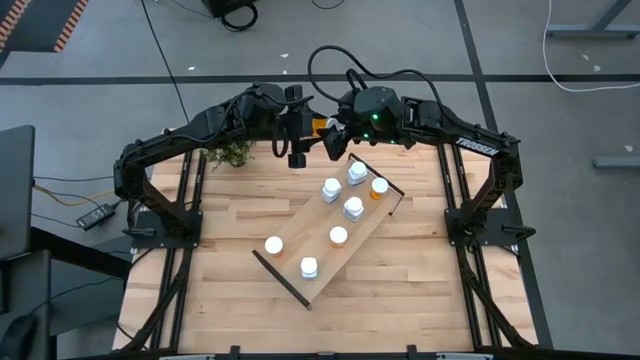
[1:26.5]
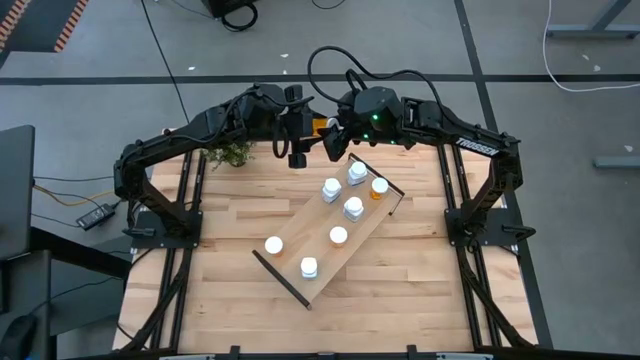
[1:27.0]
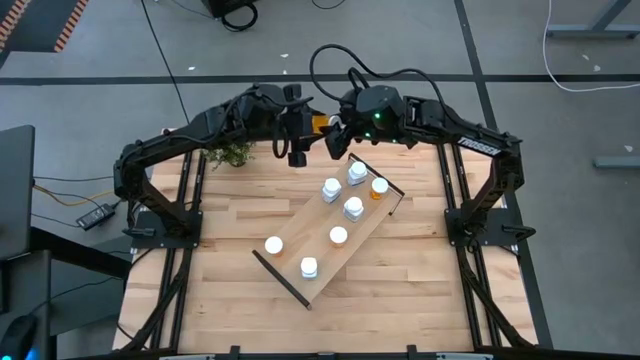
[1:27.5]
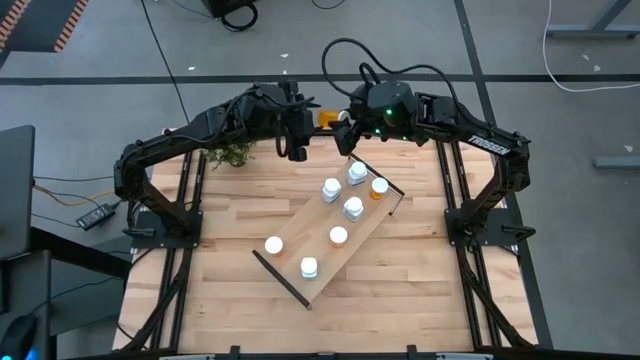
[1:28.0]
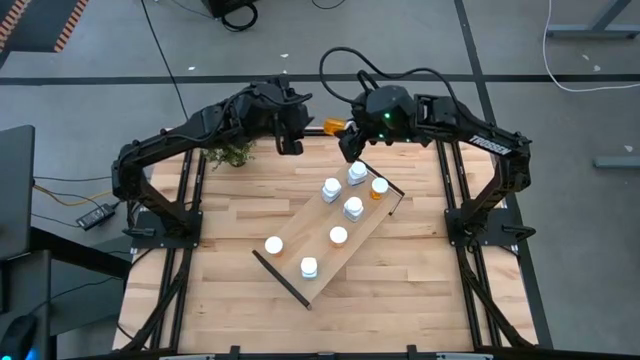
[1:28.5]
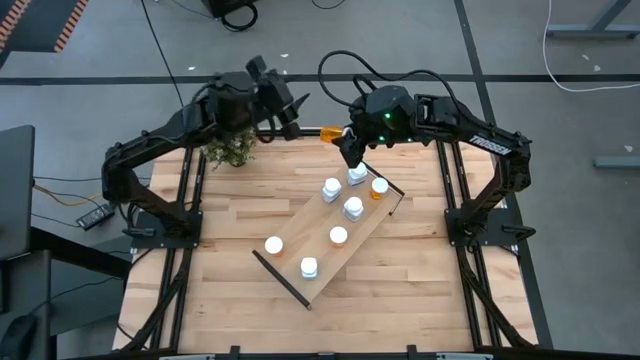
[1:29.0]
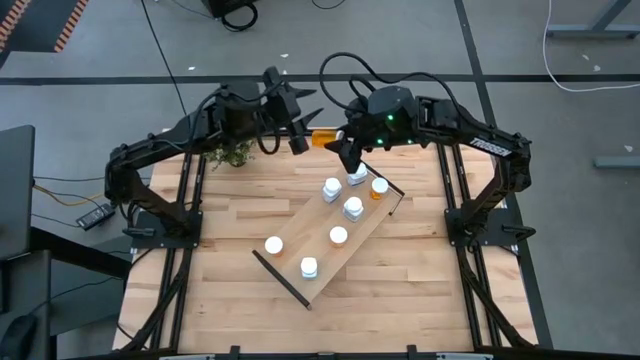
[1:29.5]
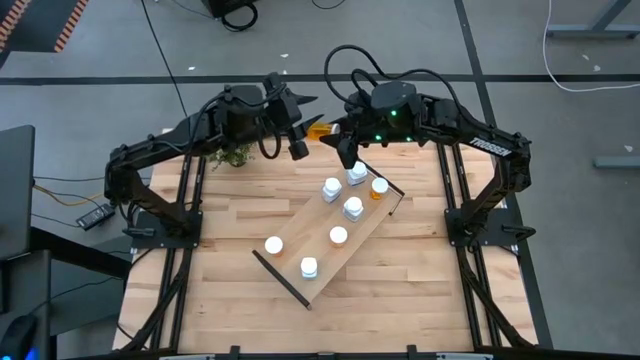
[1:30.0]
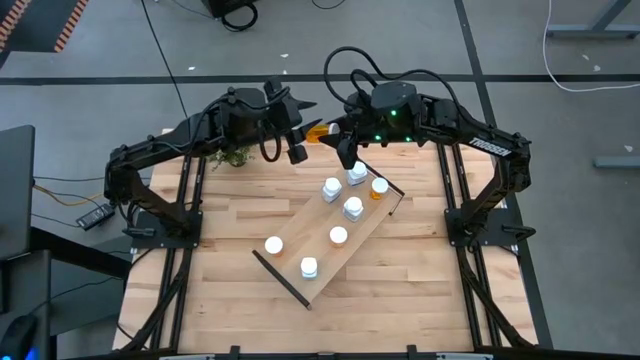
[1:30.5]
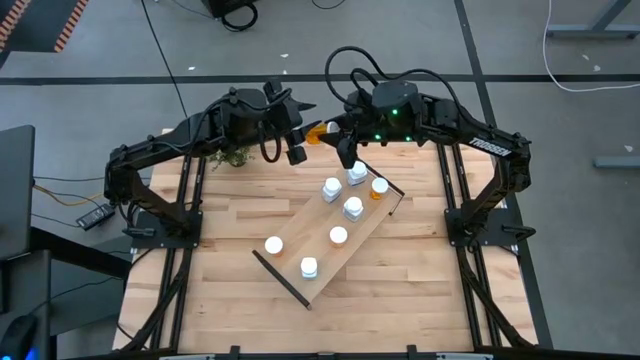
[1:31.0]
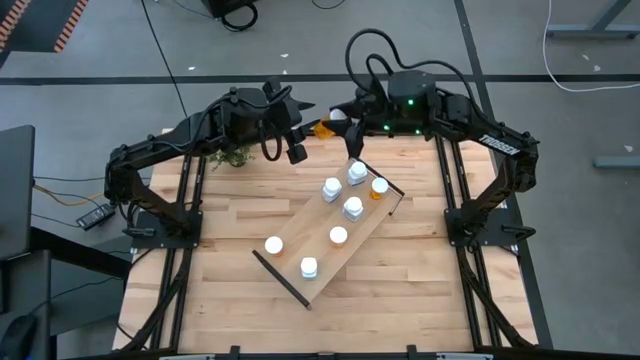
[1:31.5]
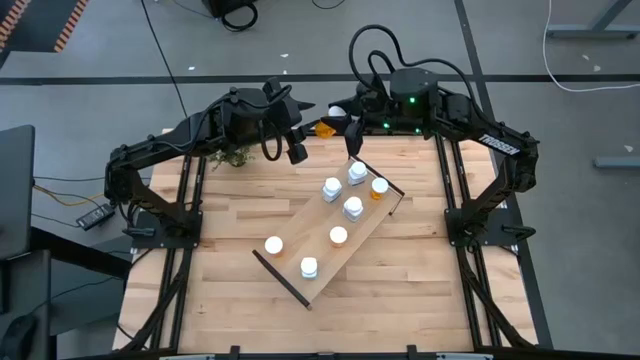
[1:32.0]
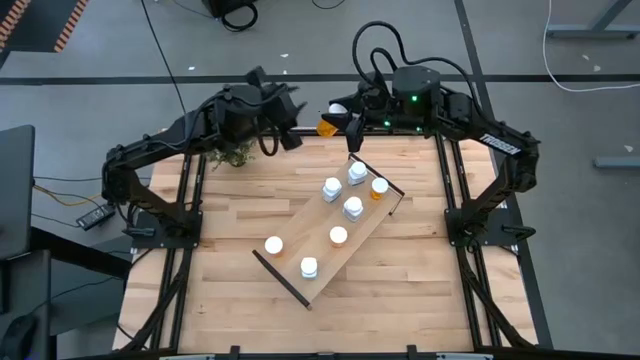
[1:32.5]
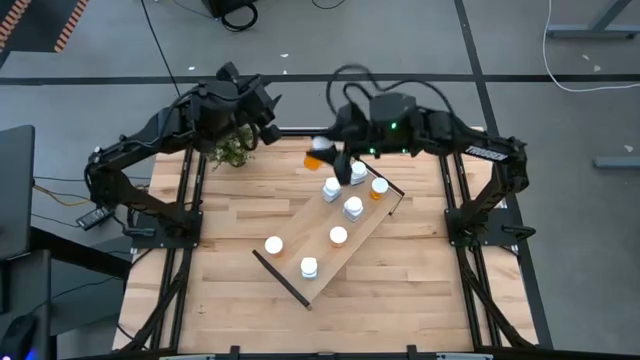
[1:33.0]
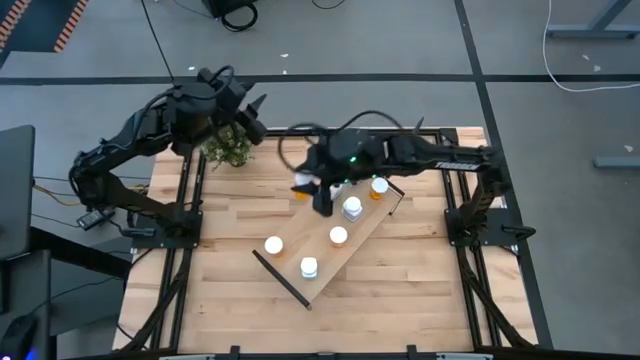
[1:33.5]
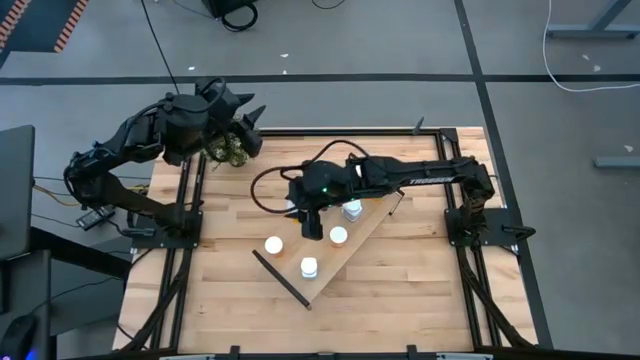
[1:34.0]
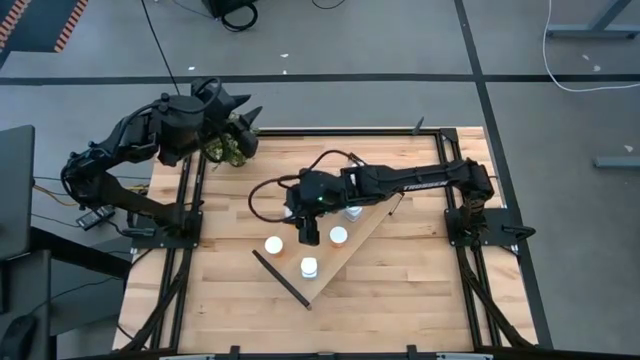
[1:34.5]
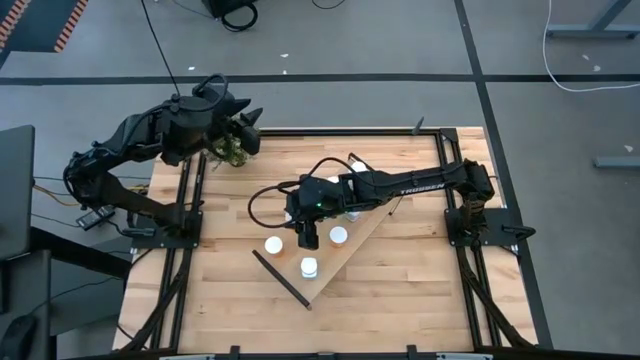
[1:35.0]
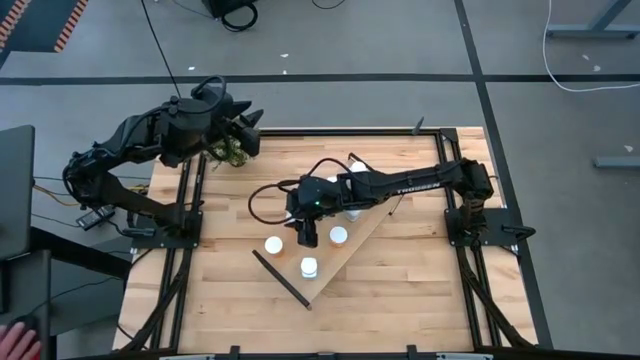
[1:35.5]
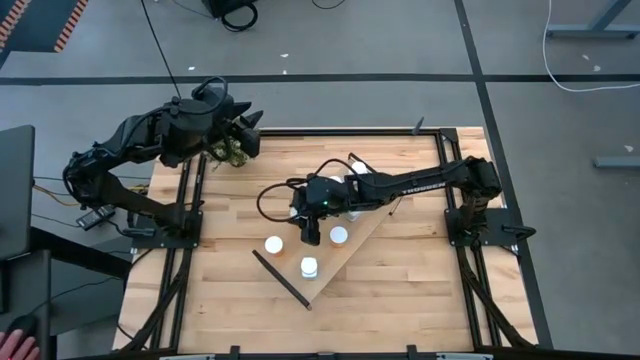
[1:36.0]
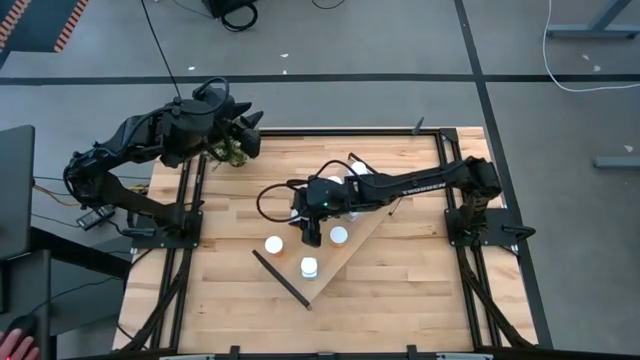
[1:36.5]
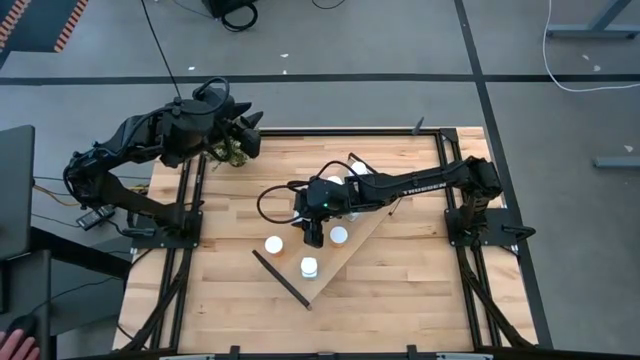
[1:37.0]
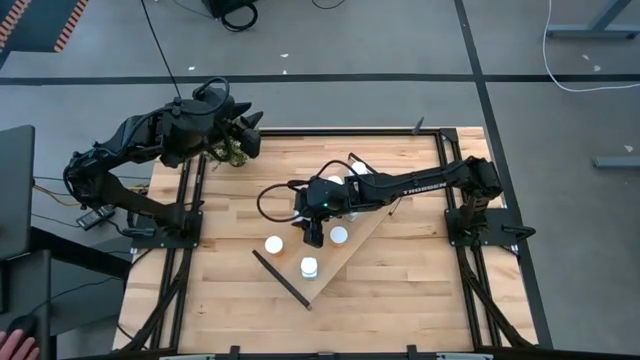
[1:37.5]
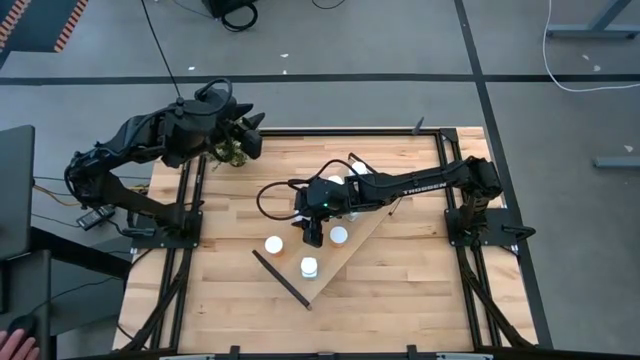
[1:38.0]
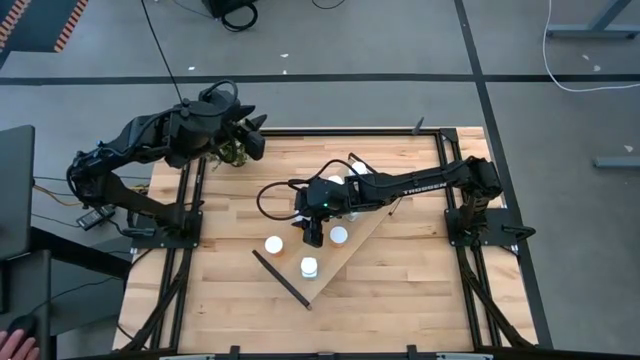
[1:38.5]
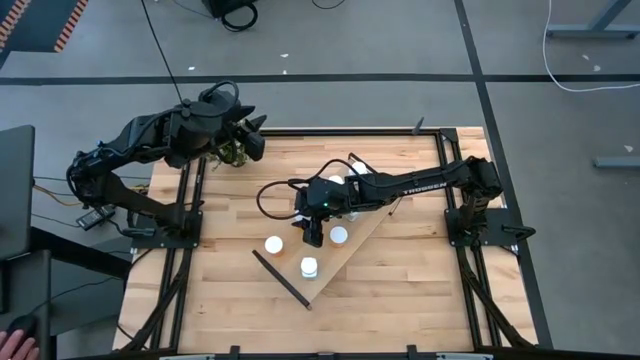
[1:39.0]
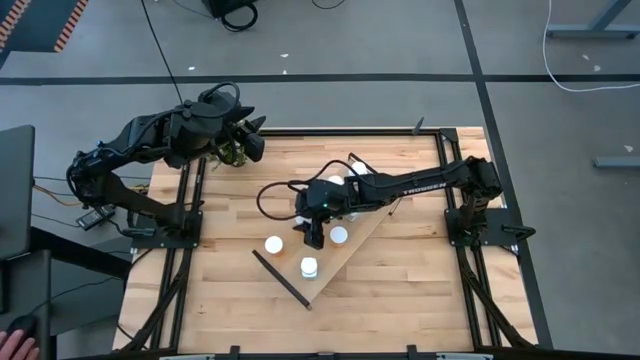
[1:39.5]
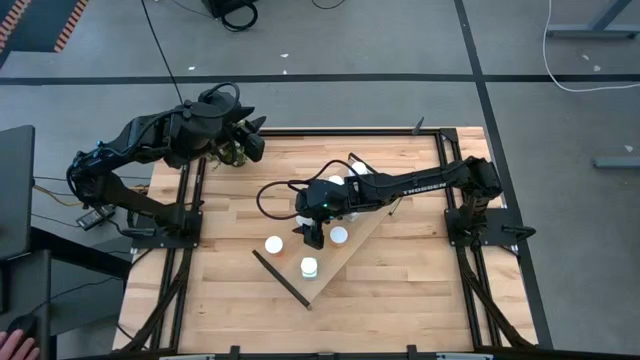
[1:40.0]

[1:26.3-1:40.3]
Task: Pick and place medicine bottles onto shelf by color
Put the orange pill bottle on the shelf

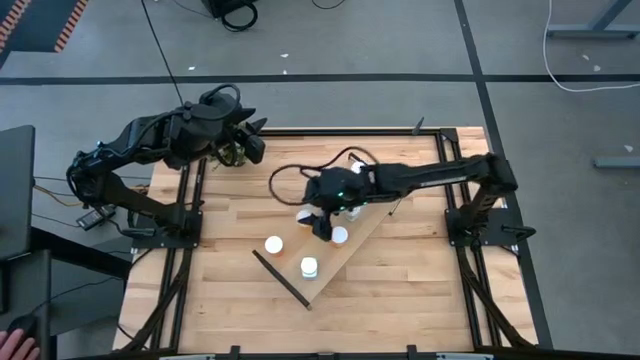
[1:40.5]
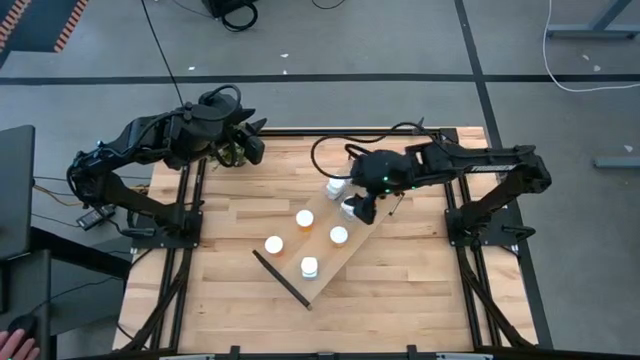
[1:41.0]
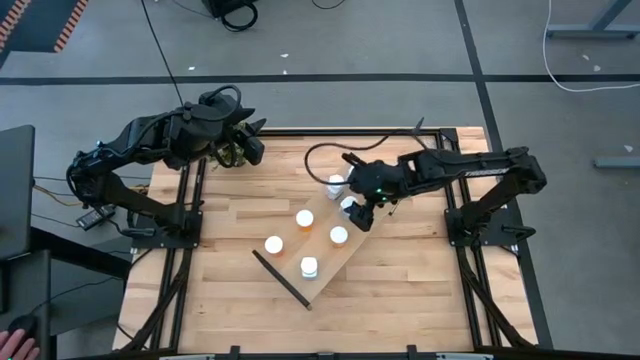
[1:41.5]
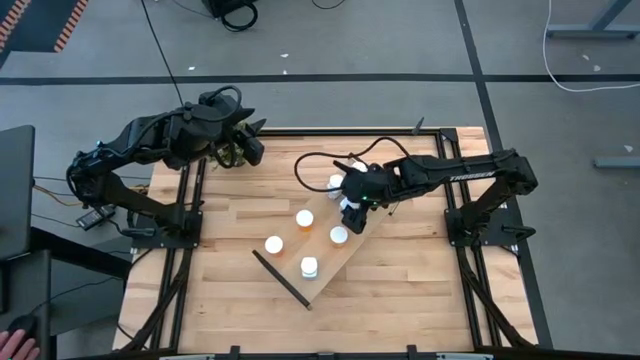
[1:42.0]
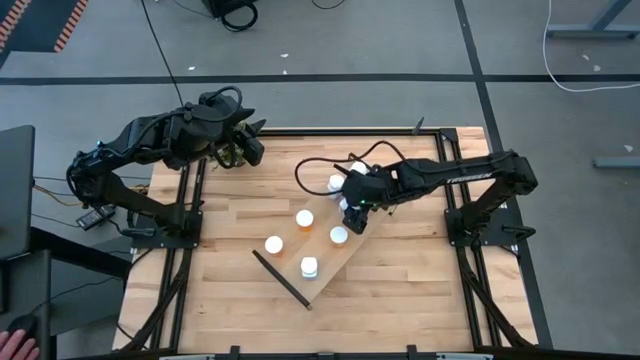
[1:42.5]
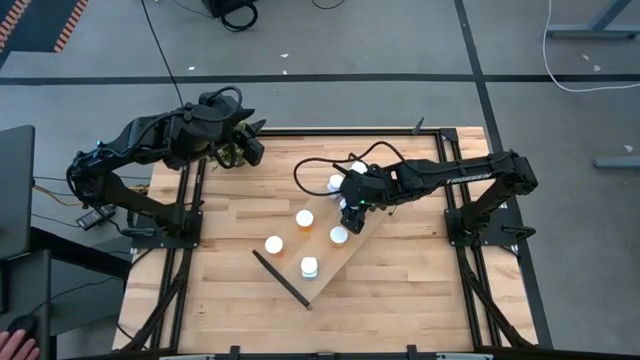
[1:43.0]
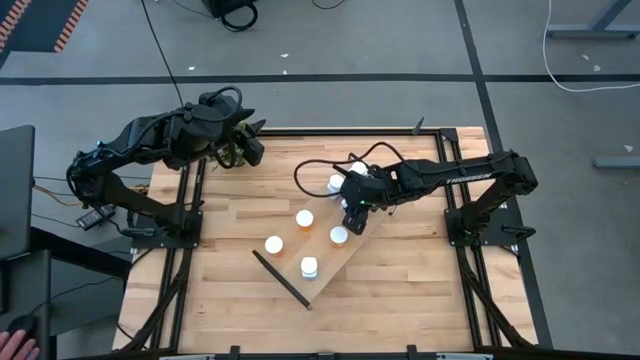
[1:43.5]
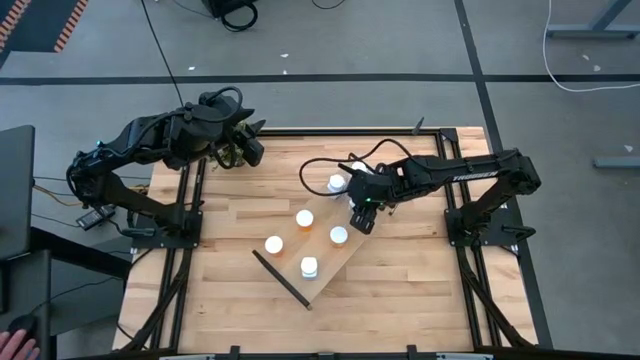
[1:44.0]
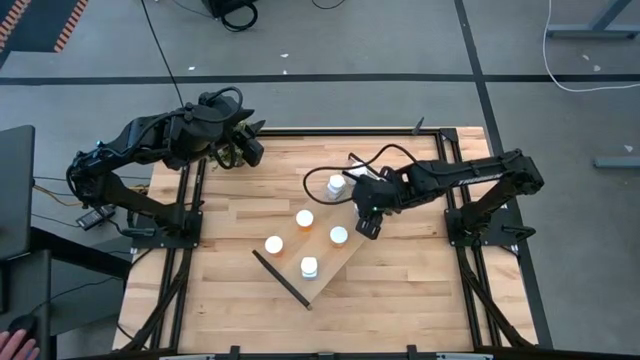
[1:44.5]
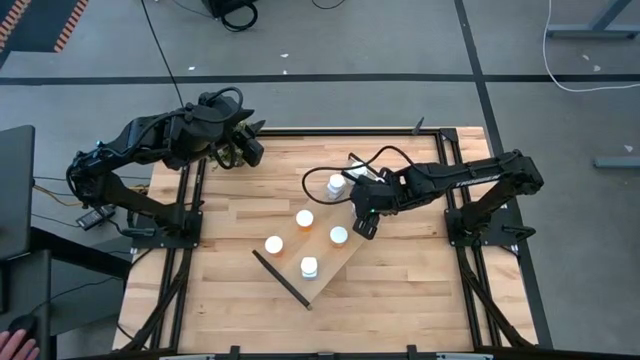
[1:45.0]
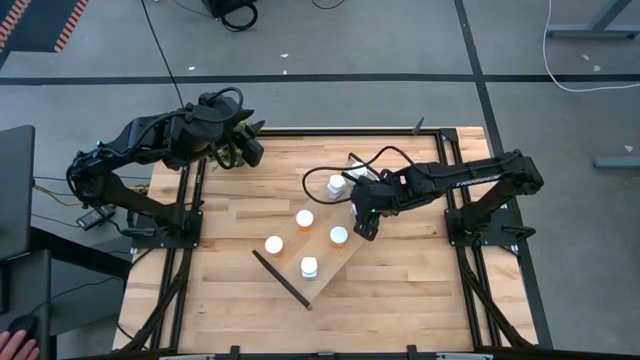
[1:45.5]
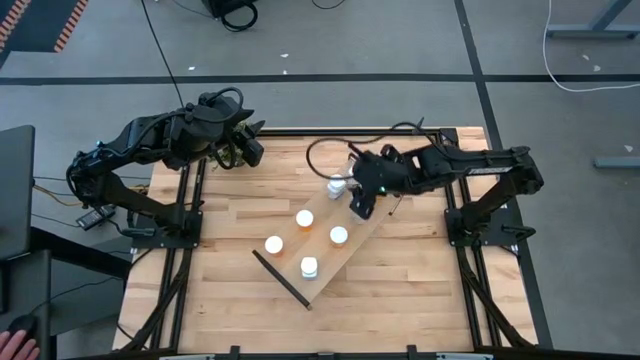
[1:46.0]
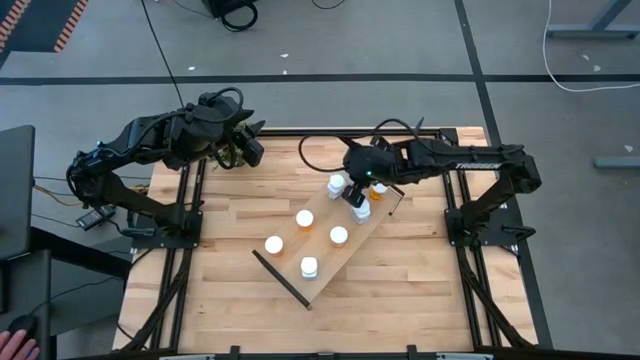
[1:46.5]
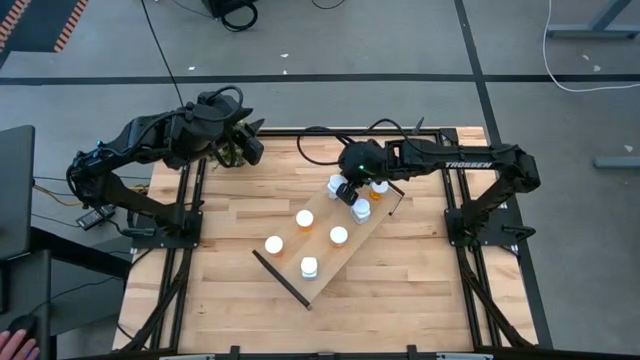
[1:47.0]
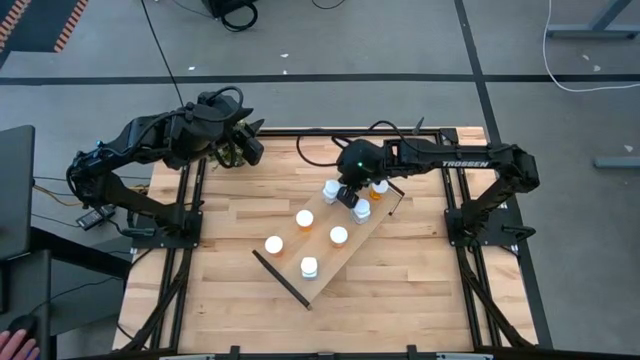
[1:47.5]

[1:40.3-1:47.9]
Adjust the white pill bottles on the shelf

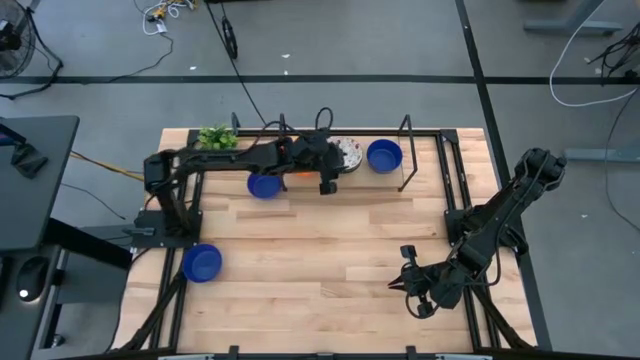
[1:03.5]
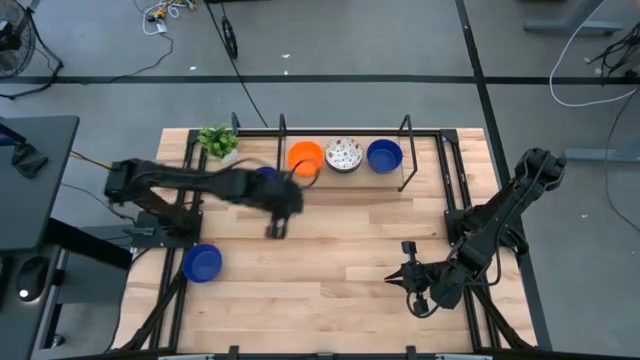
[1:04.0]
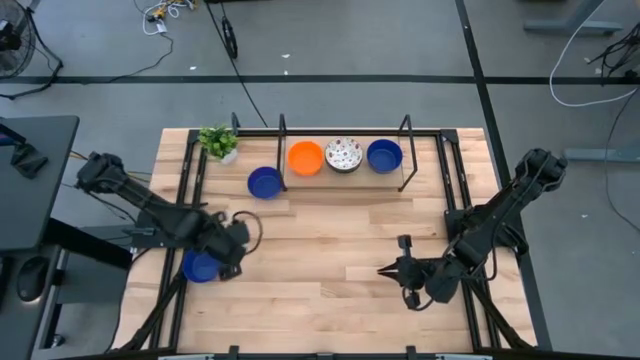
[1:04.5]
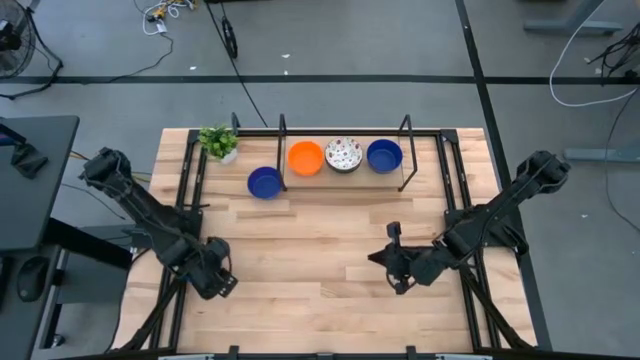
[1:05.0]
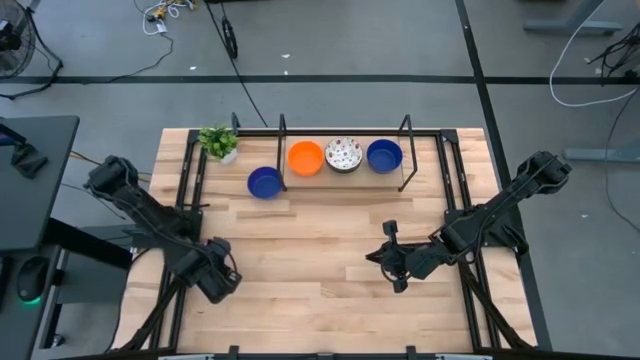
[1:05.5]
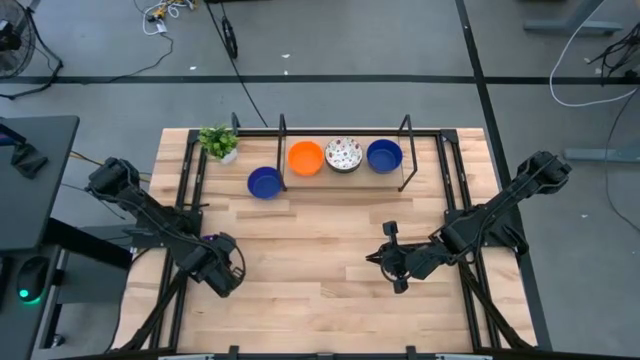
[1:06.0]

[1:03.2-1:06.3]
Task: Pick & Place Mini bowls
Stack the blue bowl on top of the blue bowl on the shelf
